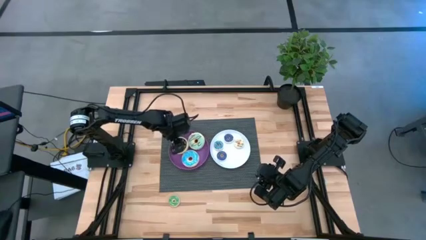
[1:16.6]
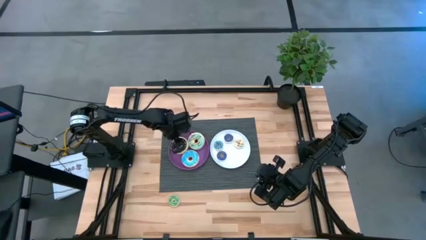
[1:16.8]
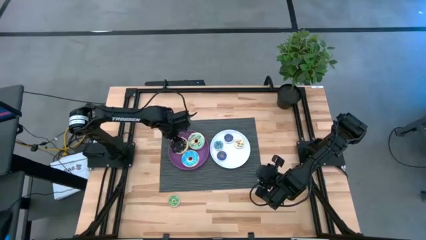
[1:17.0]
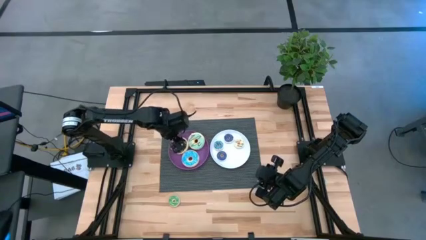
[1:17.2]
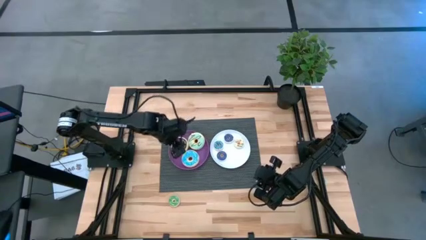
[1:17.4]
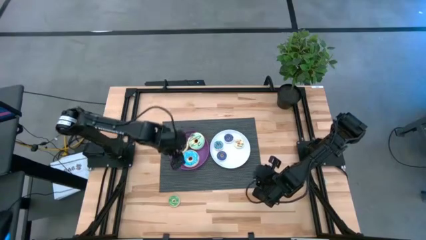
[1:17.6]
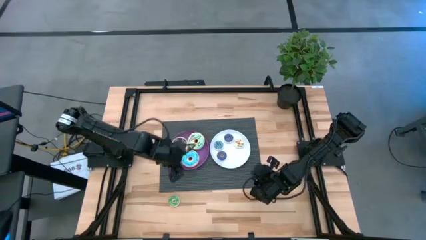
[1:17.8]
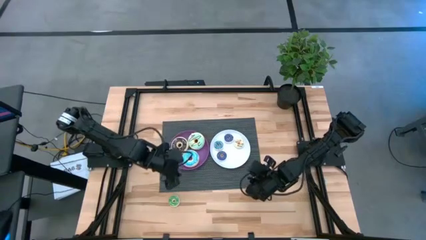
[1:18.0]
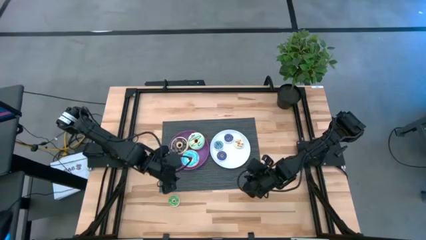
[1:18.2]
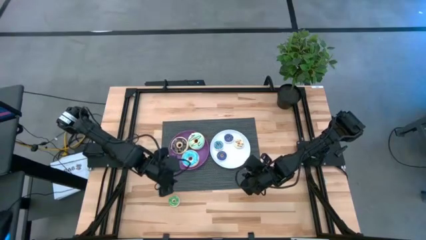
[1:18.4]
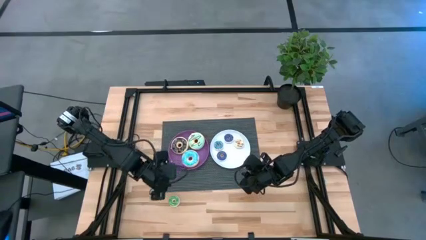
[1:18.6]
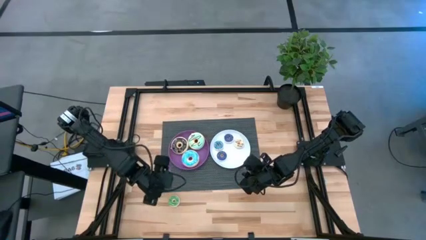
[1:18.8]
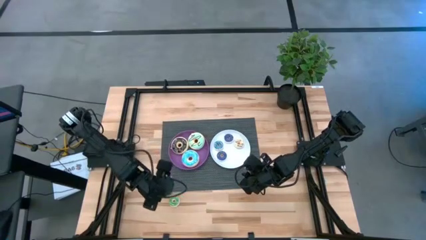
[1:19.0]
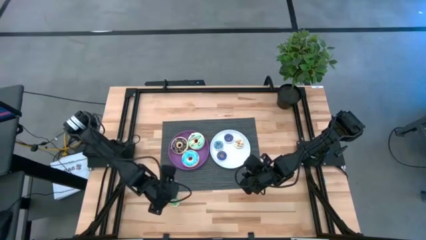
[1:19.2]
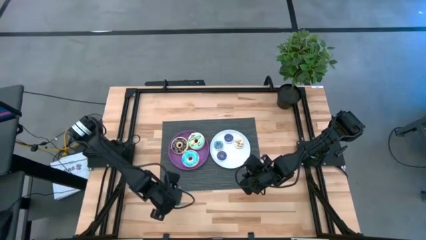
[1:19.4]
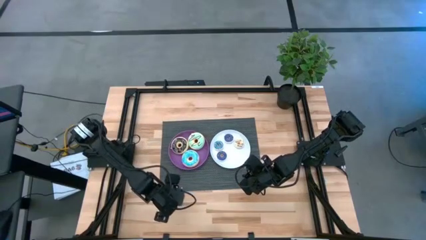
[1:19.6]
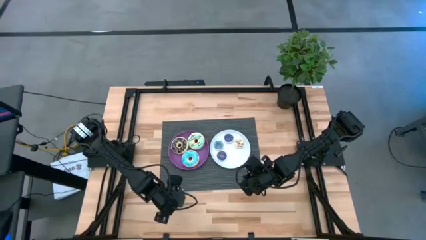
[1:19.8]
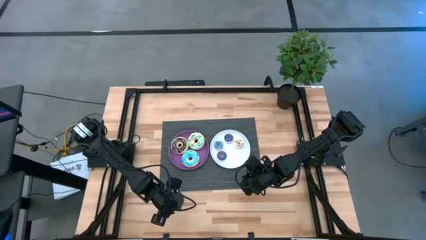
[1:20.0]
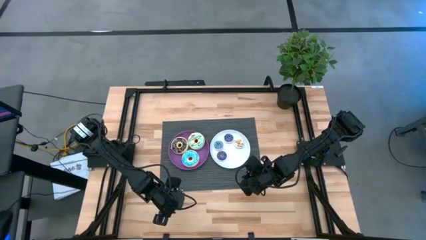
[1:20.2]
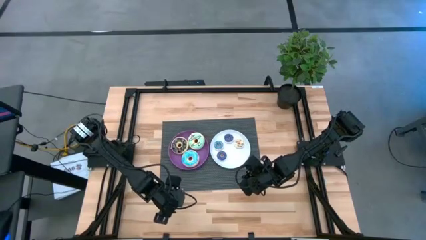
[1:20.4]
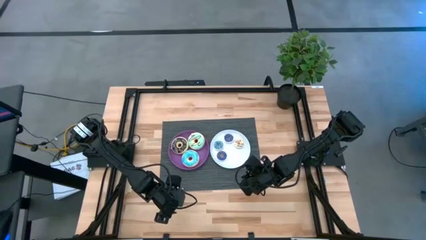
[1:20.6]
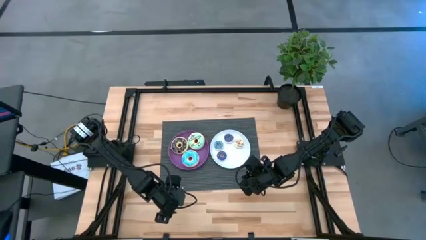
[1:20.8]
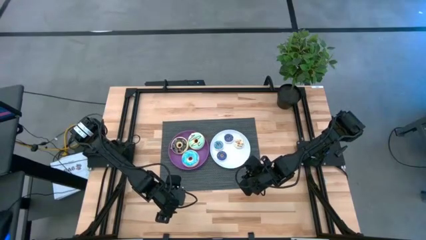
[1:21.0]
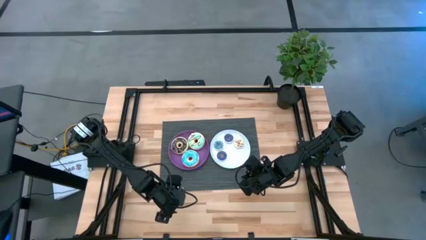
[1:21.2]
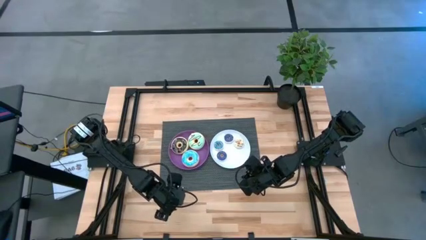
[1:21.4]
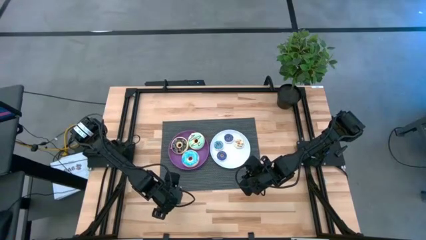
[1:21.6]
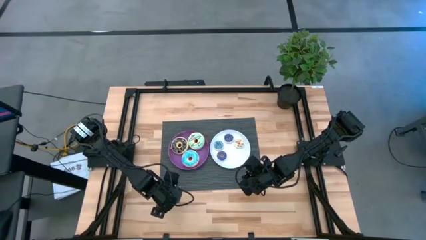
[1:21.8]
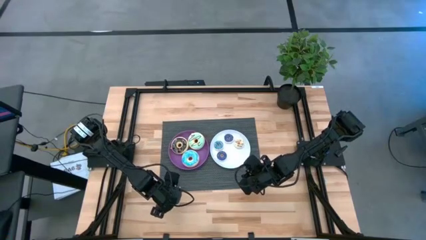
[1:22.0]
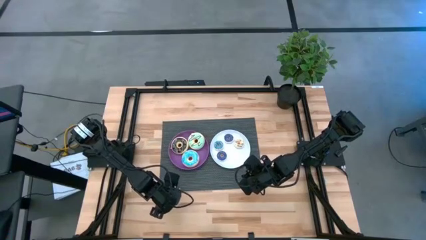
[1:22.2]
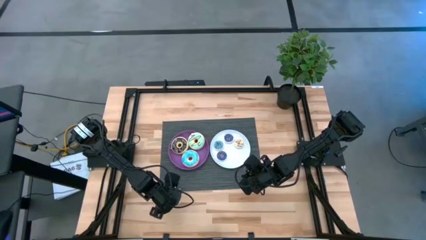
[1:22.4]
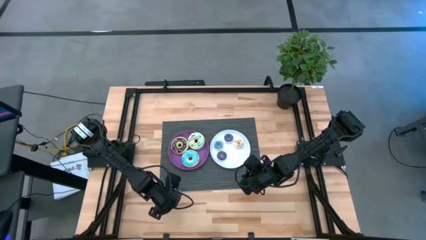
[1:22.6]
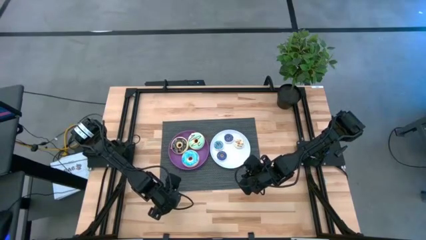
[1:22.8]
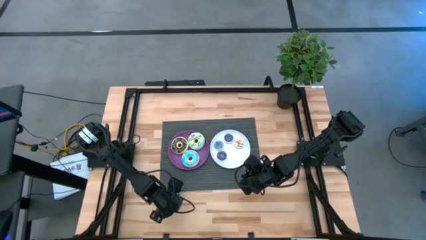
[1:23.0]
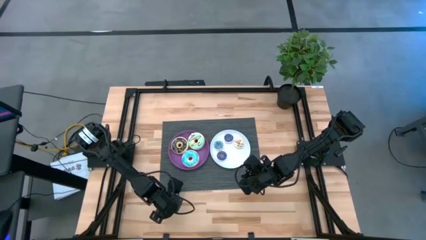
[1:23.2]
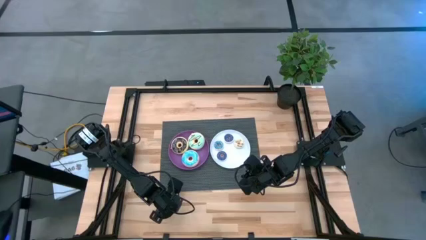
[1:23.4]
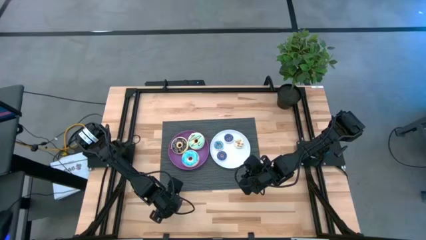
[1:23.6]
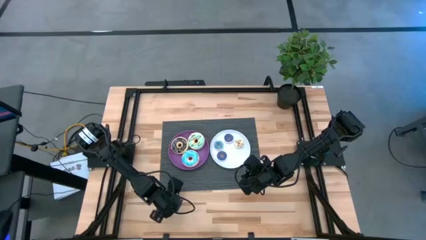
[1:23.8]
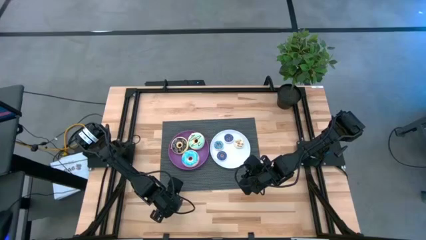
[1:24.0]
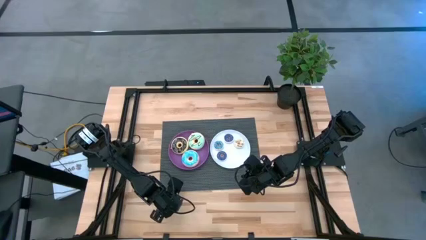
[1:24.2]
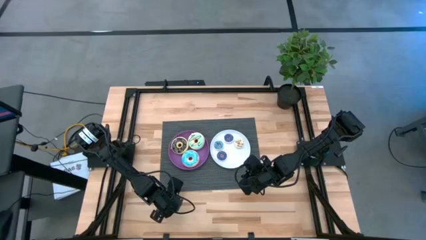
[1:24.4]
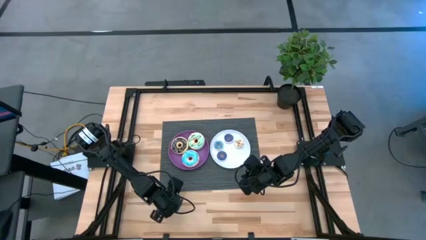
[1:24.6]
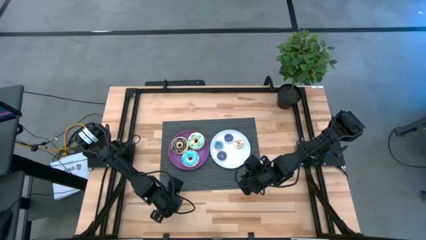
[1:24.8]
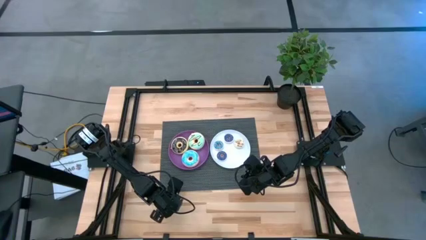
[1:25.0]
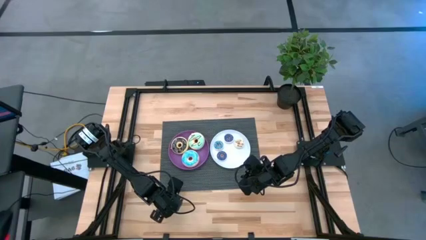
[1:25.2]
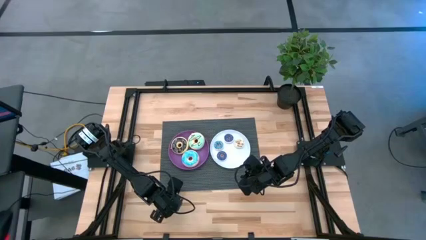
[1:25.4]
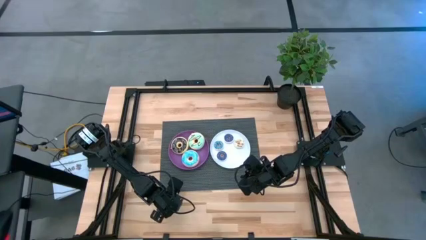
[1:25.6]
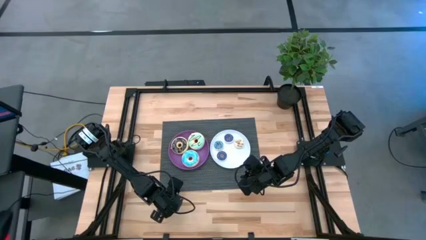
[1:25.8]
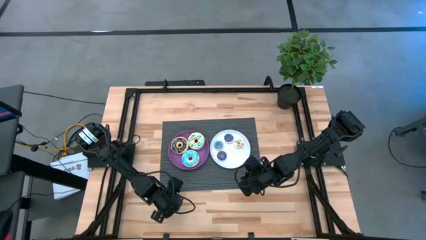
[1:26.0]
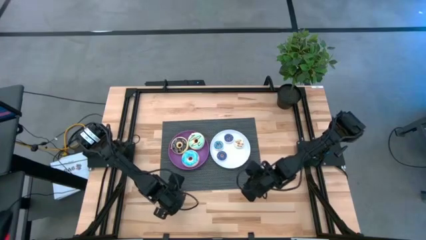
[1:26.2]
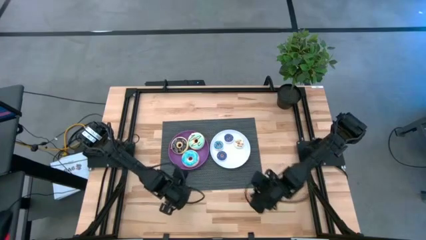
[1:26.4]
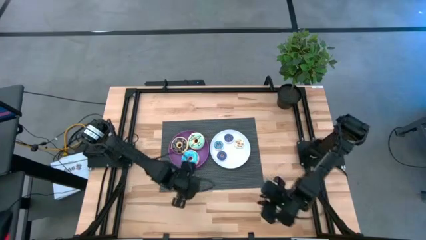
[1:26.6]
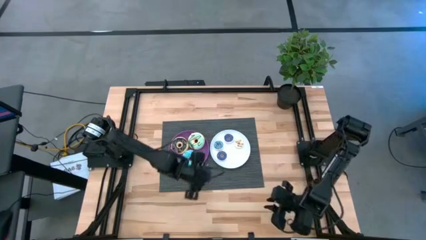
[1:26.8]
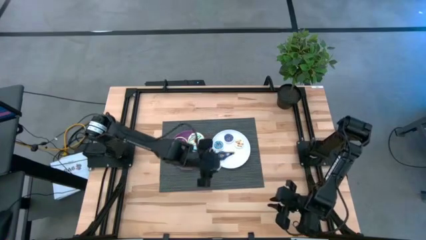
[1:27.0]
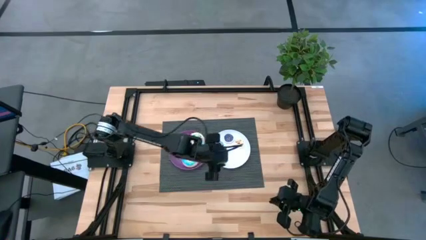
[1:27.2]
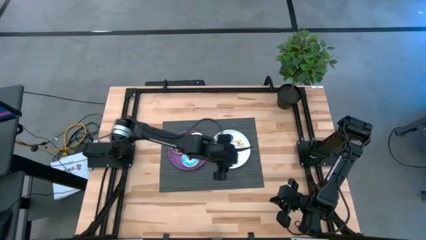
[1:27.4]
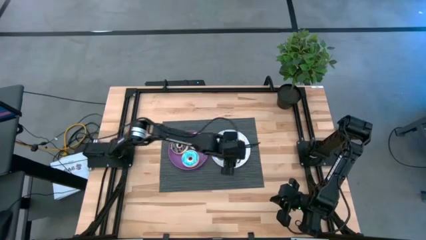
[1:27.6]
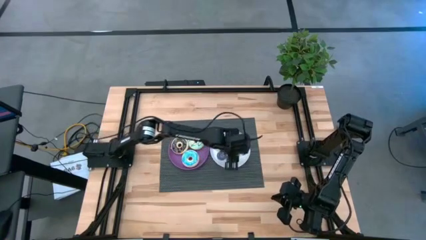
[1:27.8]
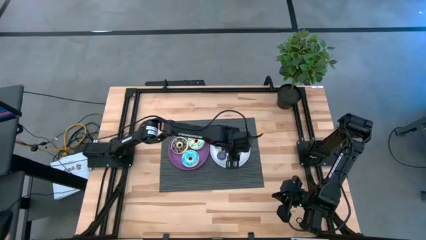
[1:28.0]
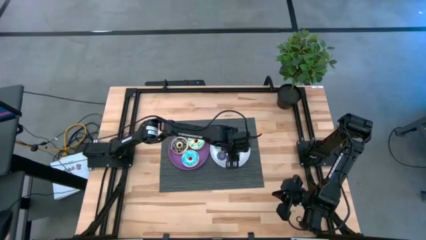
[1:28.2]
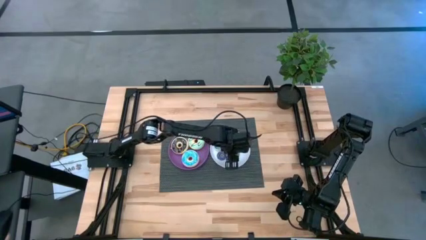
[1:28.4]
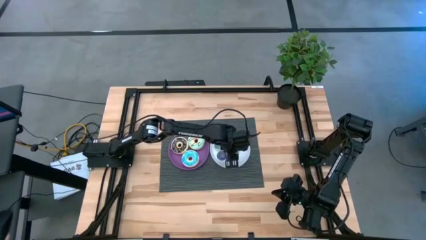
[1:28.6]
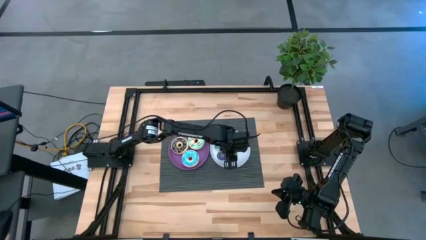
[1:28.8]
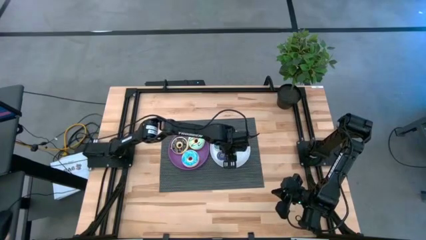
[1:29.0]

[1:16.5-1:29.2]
Task: Pick & Place donuts
Put the small green donut on the white plate
